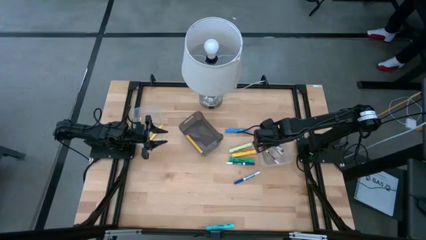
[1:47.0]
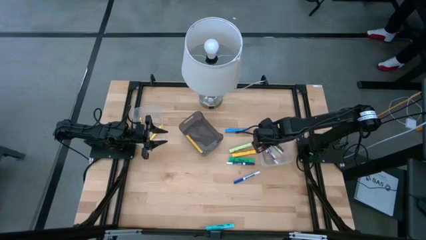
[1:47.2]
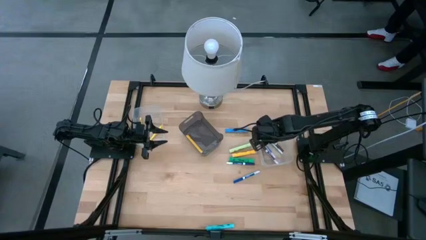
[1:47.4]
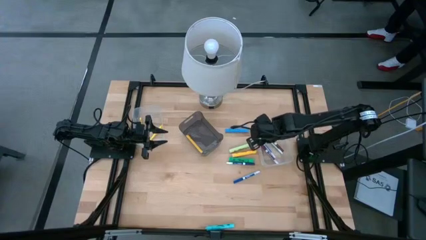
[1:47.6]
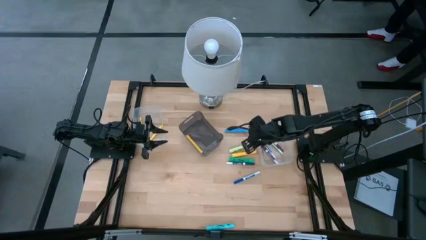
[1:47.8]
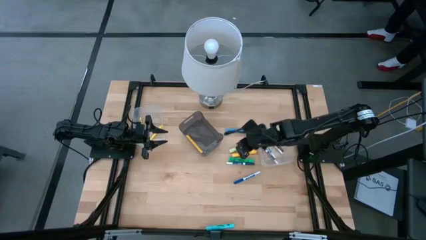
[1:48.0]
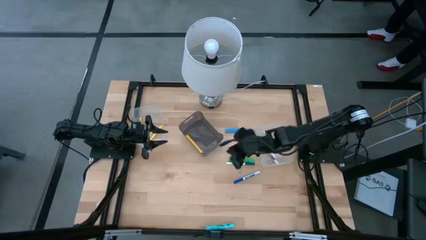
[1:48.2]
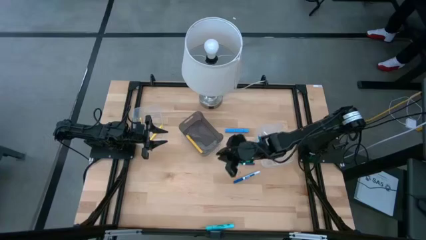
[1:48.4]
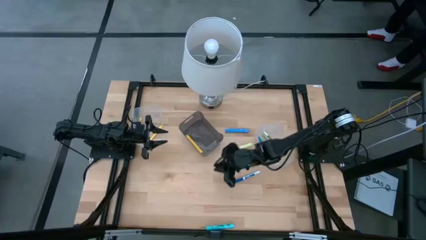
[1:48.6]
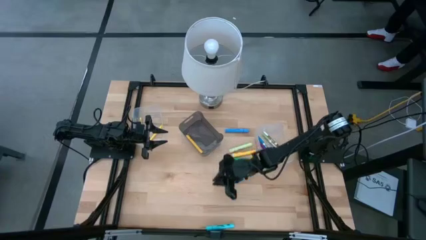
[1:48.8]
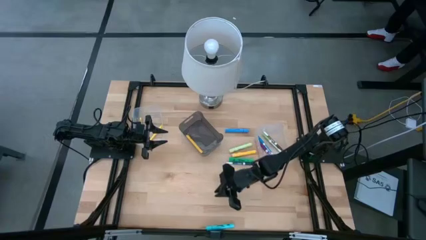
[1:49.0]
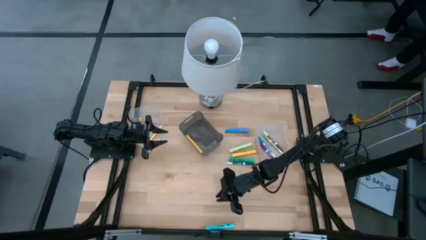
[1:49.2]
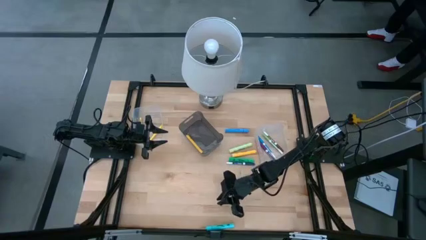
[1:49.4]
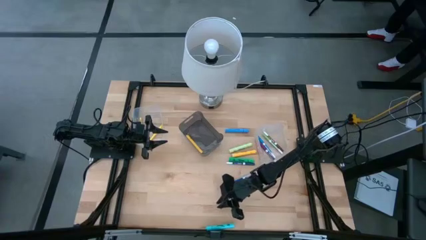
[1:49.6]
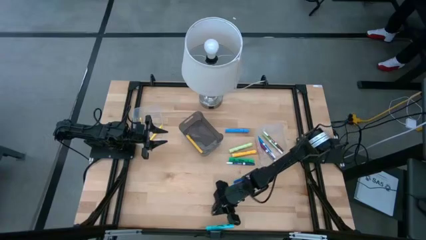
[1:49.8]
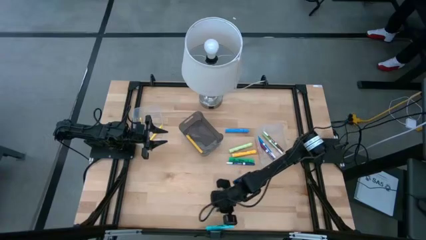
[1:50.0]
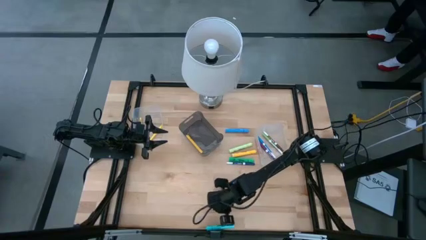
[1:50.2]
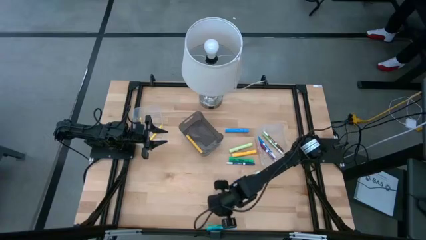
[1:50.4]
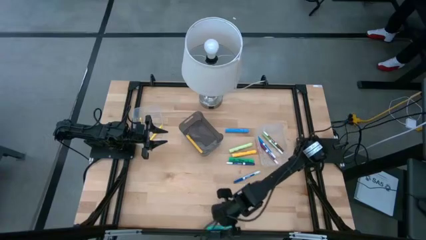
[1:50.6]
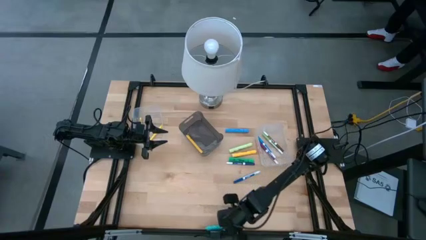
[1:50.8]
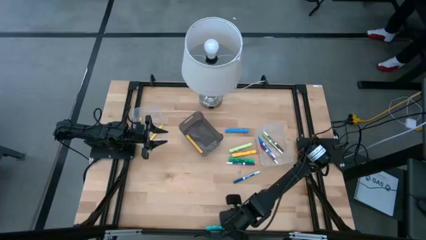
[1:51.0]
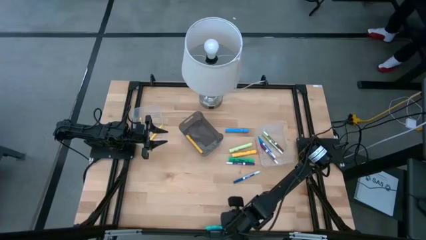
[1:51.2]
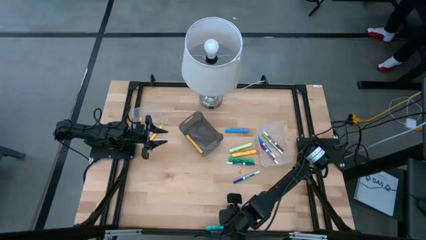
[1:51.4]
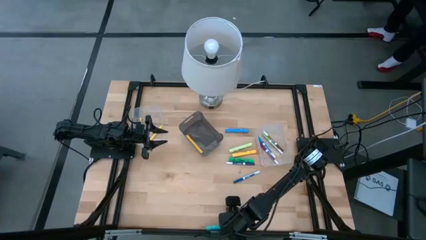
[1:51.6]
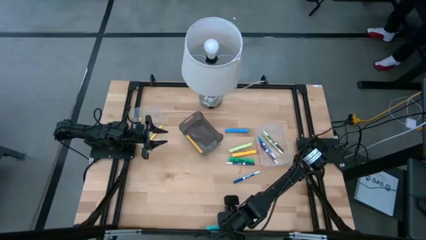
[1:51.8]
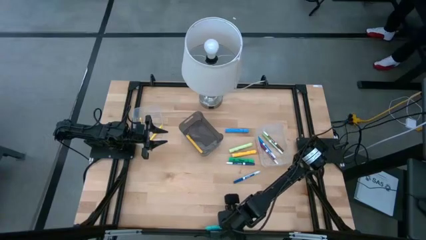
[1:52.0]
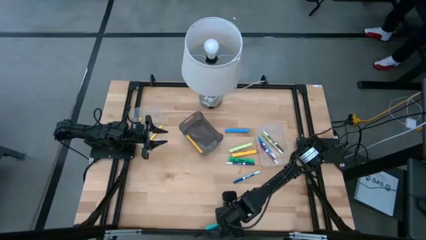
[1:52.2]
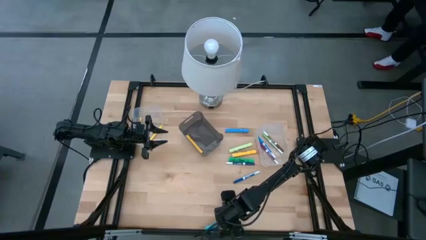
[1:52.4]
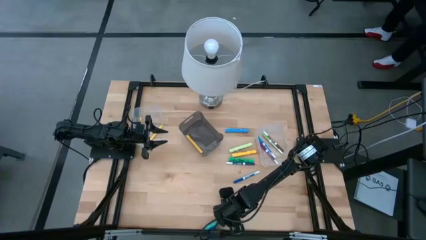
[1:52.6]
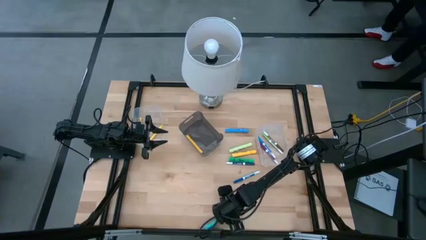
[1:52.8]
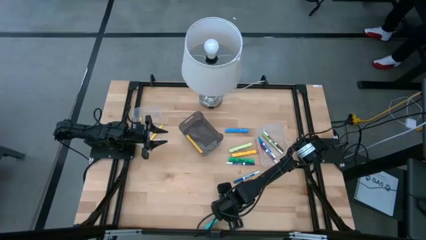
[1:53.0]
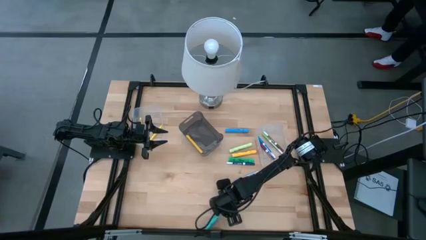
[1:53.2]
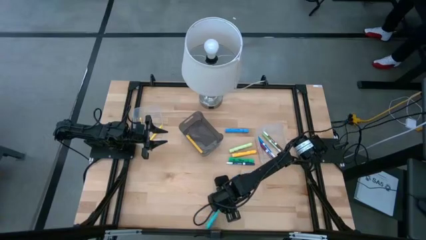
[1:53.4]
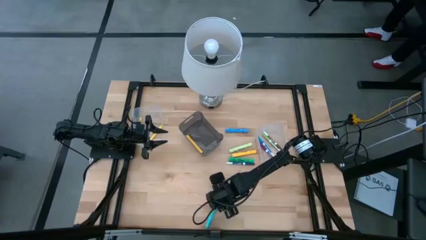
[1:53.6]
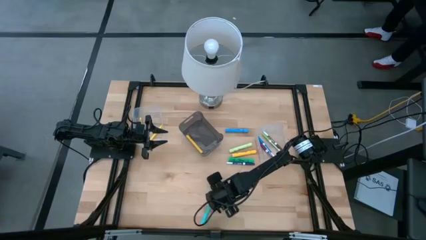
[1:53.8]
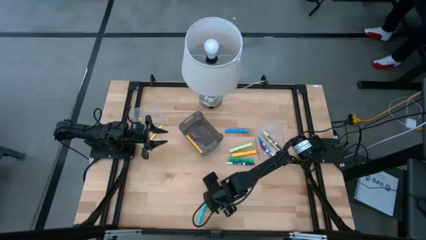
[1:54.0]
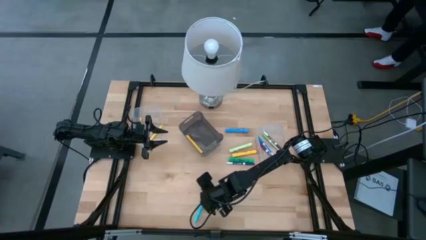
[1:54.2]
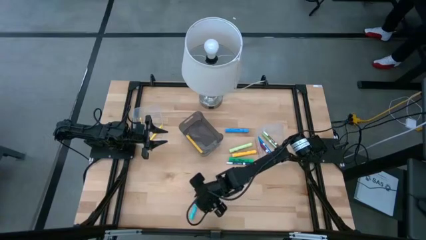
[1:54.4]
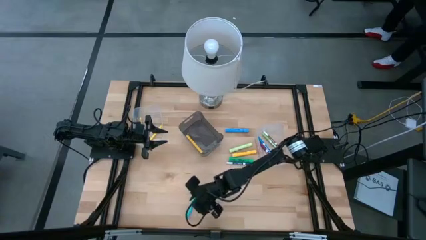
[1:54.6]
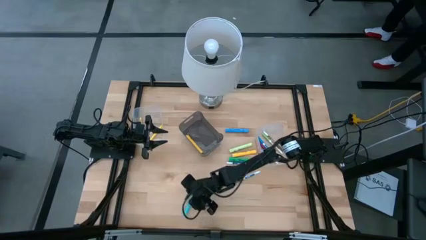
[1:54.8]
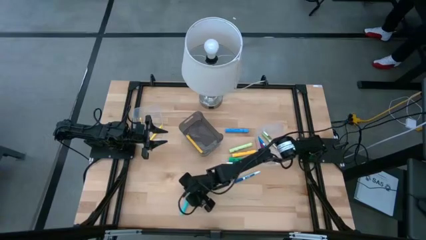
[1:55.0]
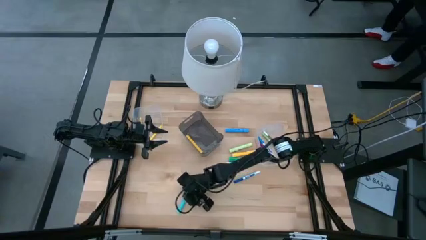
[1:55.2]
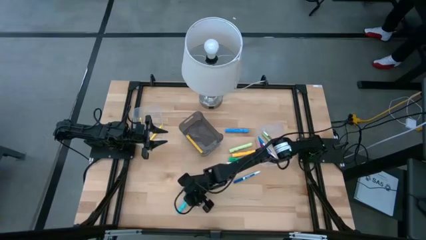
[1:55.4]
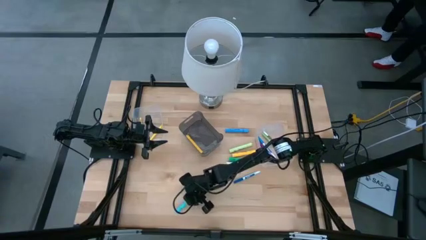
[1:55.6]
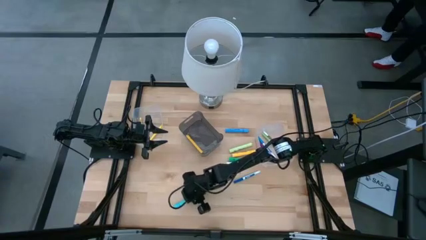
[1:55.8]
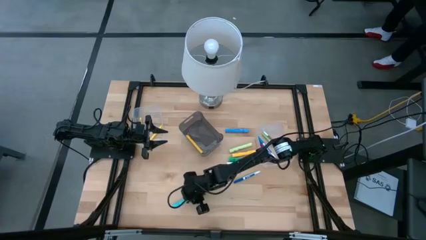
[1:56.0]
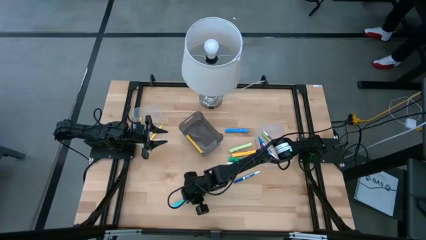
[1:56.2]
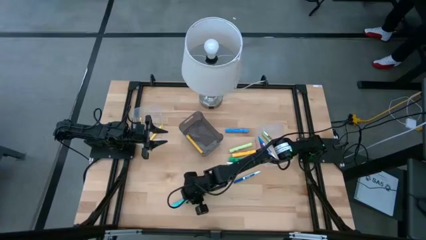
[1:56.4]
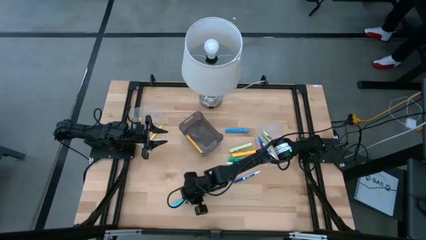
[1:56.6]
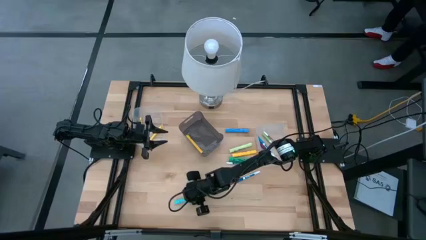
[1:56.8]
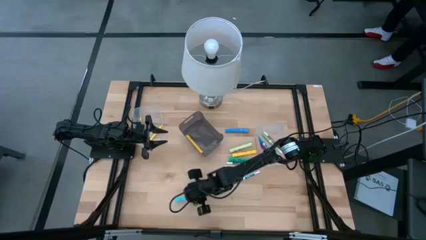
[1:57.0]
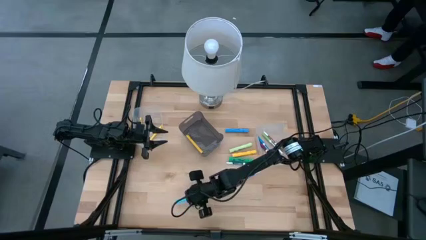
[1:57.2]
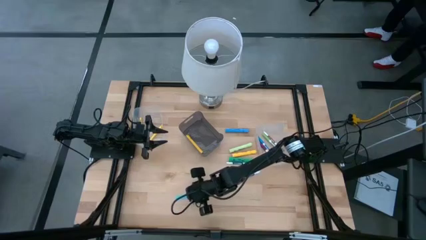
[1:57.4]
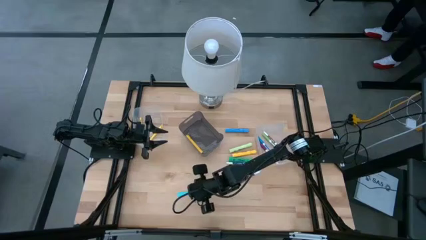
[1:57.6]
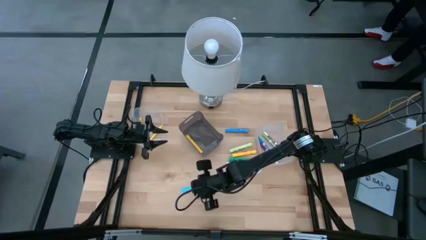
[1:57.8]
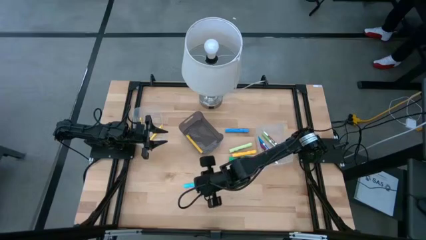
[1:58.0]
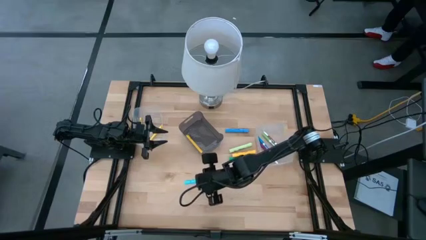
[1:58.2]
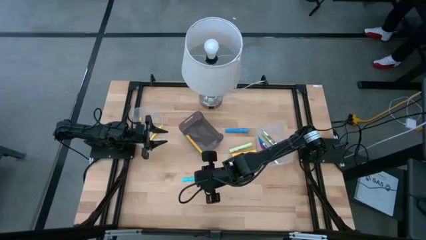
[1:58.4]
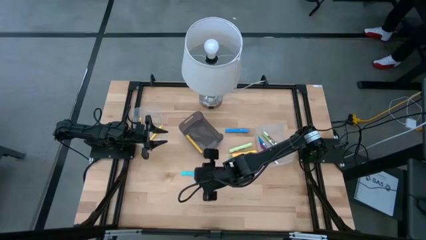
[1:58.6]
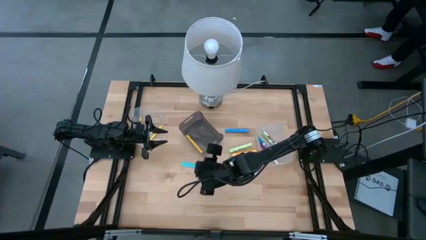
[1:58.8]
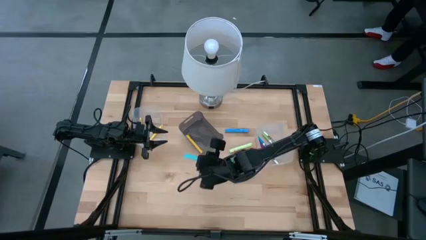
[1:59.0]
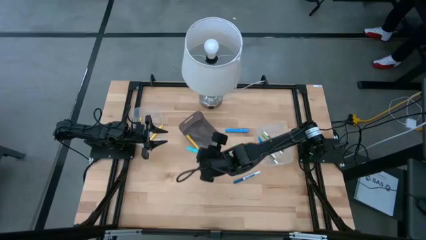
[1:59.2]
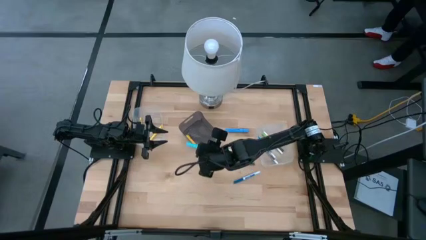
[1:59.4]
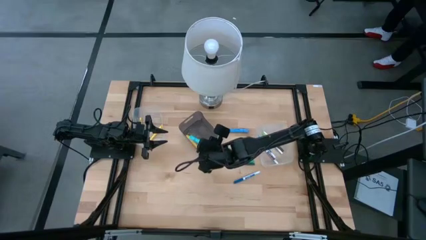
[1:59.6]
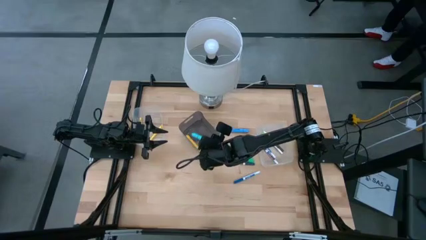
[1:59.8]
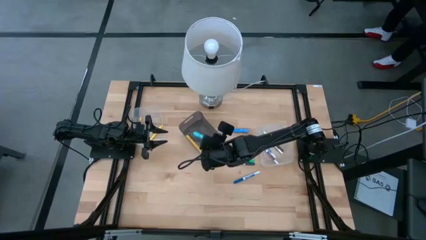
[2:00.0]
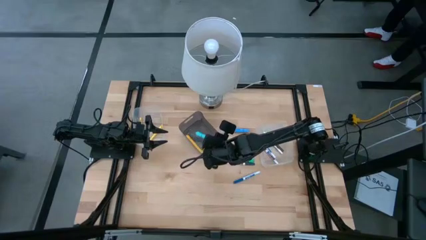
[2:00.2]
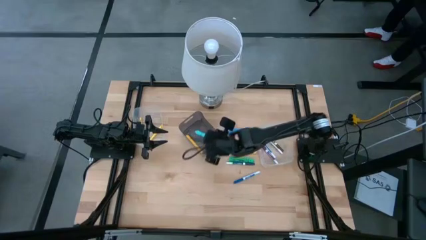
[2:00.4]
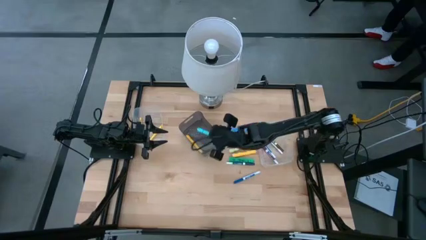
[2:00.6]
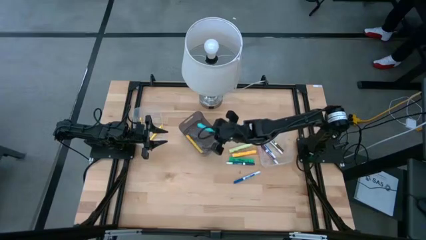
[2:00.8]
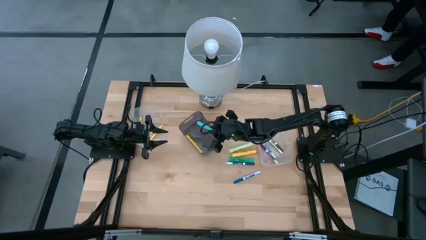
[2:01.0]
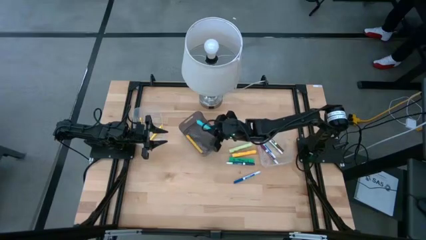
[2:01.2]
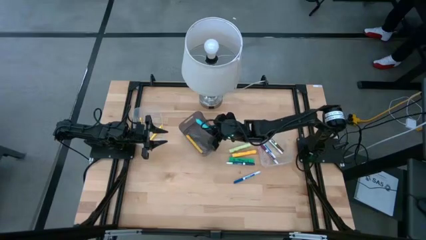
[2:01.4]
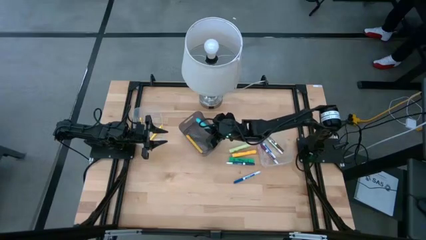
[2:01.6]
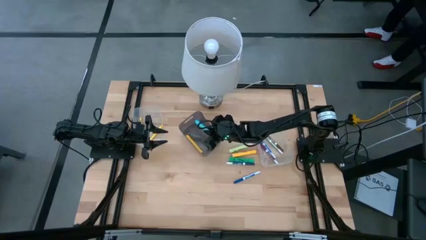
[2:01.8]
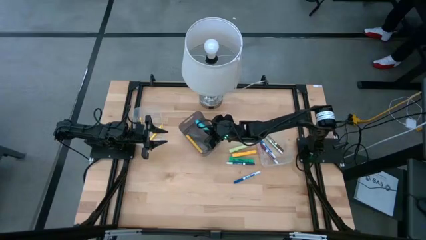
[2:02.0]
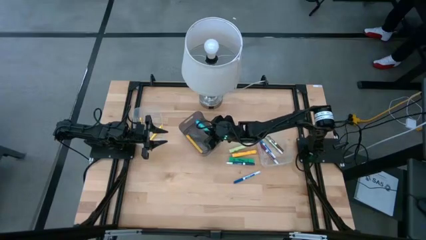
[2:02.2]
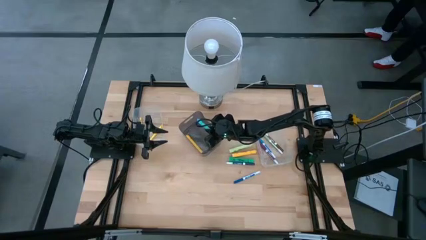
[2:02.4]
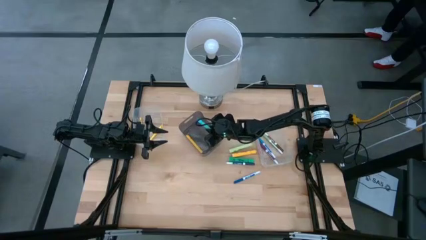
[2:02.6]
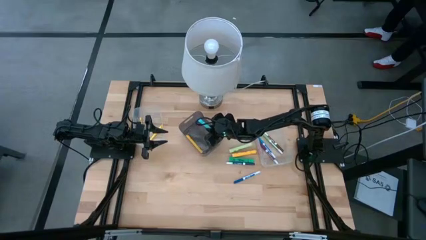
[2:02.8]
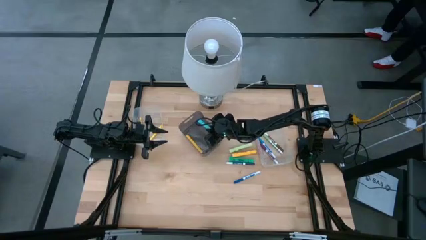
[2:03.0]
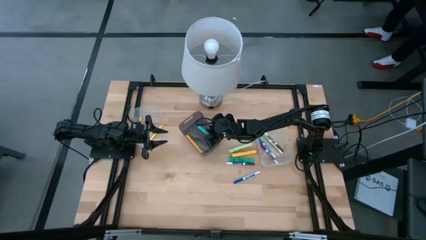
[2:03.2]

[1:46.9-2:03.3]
Task: Pick & Place Markers
Put the light blue marker into the black bin
